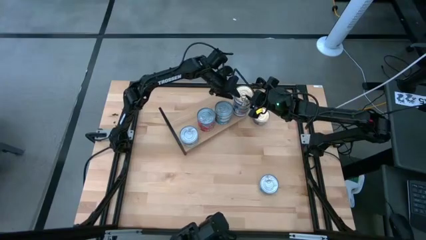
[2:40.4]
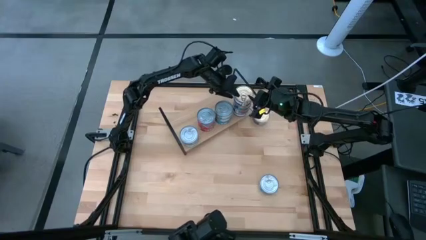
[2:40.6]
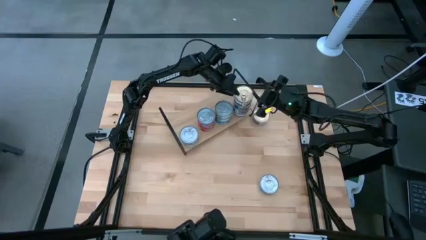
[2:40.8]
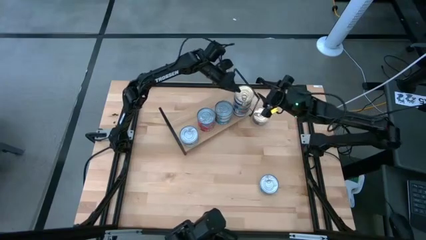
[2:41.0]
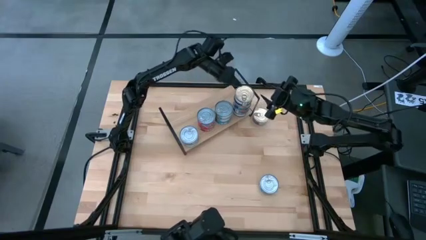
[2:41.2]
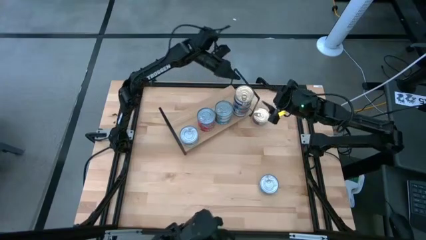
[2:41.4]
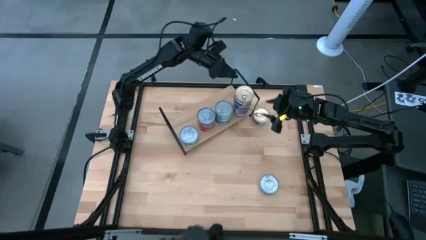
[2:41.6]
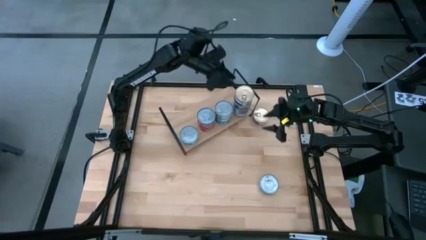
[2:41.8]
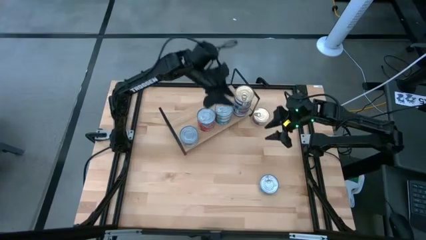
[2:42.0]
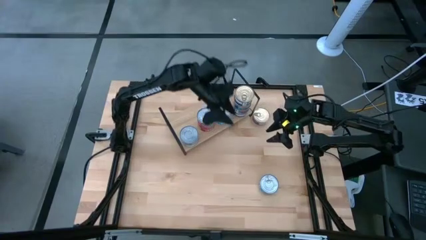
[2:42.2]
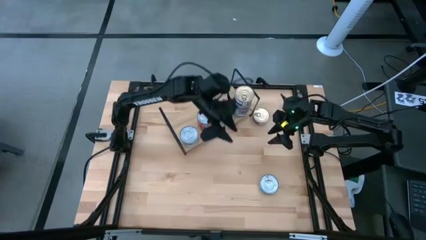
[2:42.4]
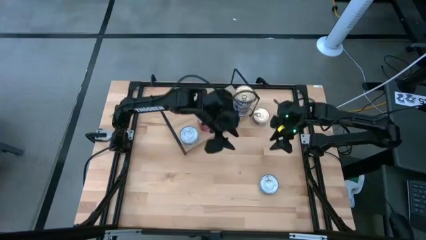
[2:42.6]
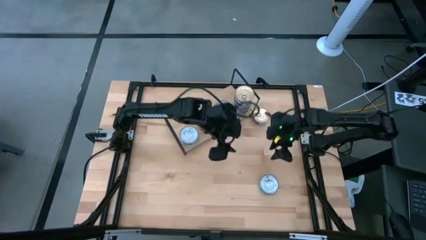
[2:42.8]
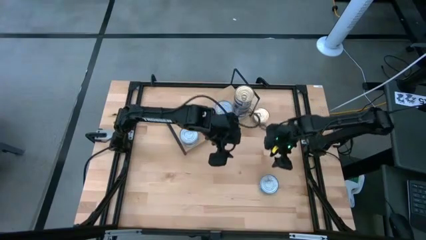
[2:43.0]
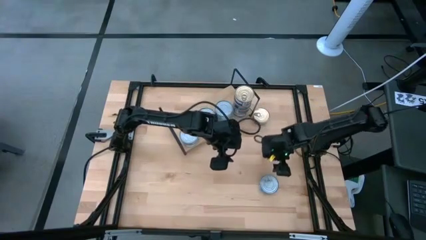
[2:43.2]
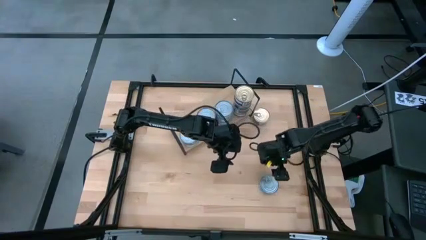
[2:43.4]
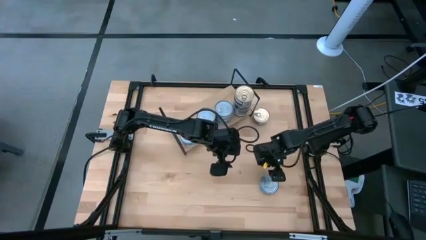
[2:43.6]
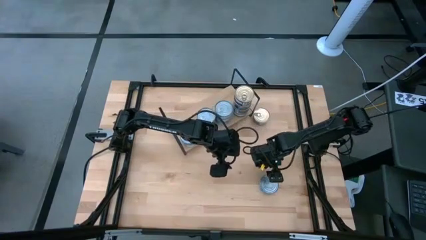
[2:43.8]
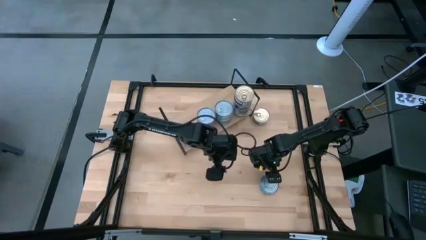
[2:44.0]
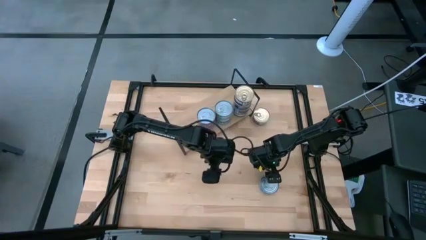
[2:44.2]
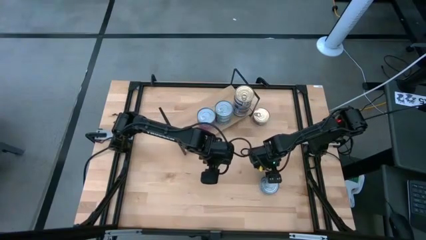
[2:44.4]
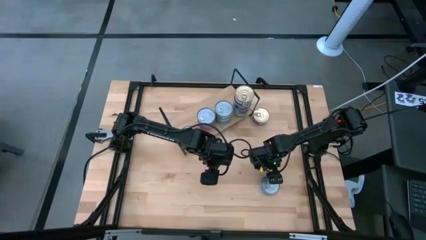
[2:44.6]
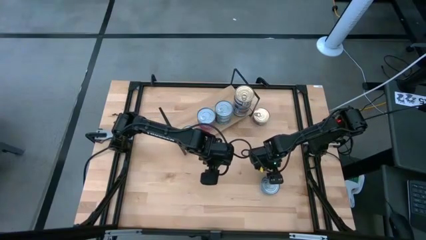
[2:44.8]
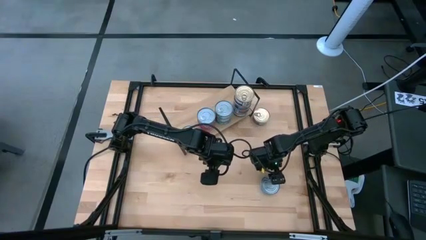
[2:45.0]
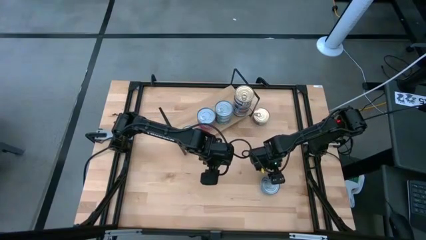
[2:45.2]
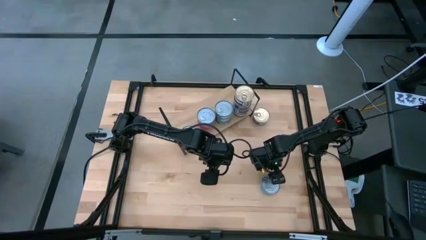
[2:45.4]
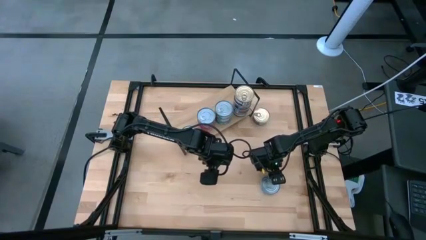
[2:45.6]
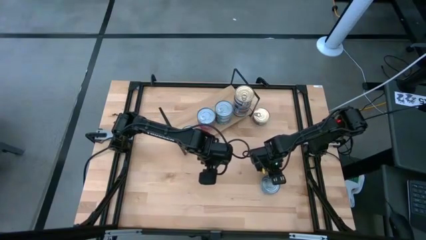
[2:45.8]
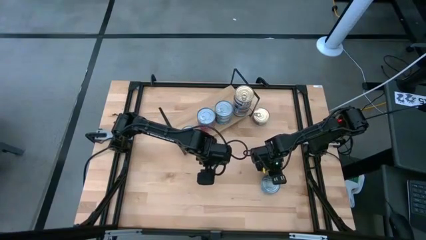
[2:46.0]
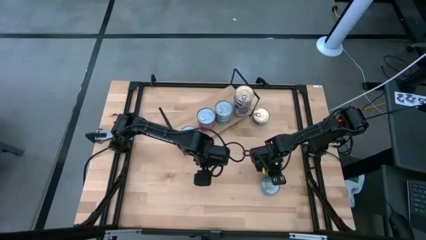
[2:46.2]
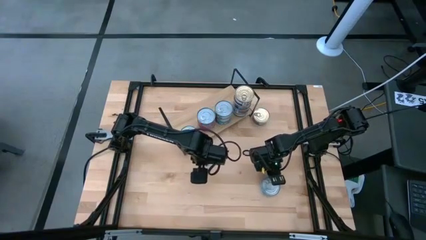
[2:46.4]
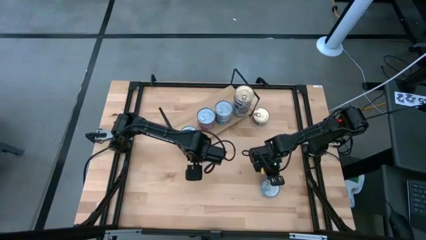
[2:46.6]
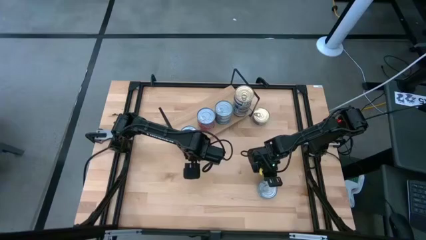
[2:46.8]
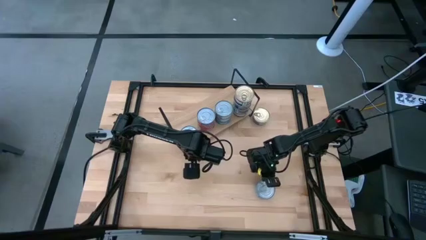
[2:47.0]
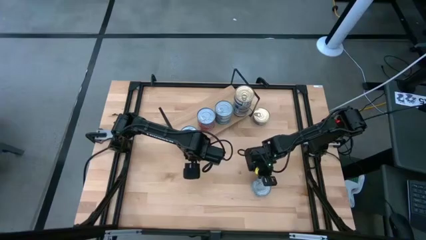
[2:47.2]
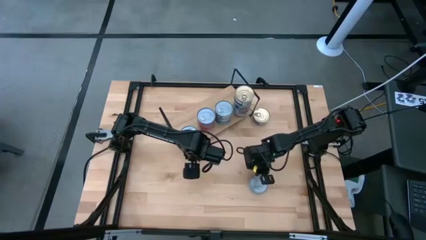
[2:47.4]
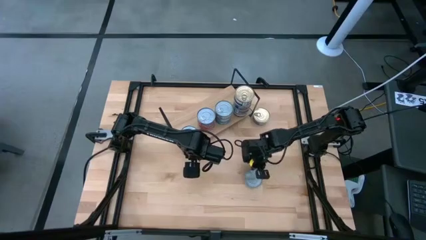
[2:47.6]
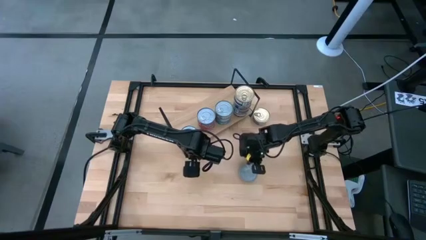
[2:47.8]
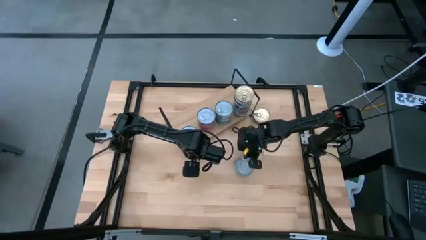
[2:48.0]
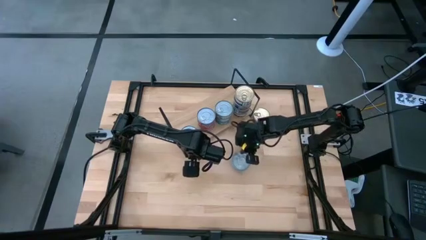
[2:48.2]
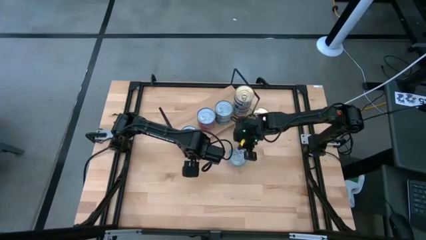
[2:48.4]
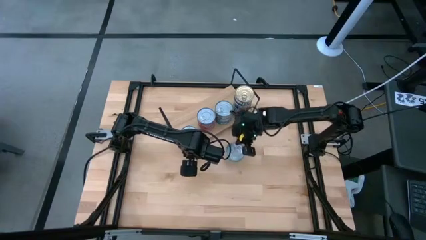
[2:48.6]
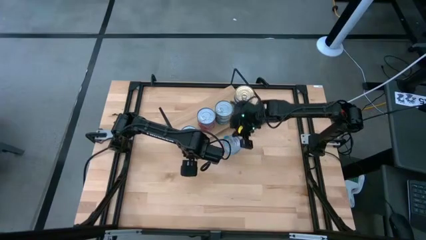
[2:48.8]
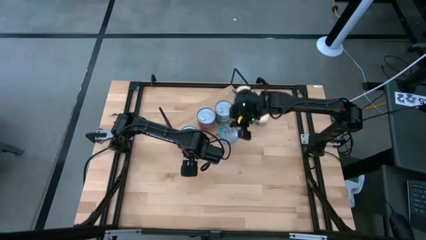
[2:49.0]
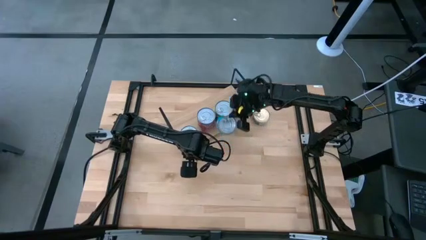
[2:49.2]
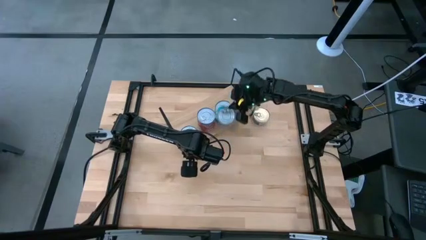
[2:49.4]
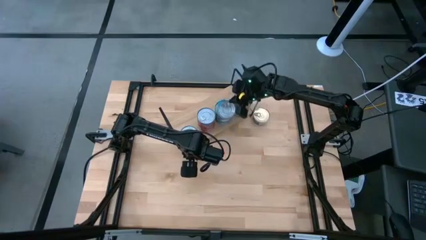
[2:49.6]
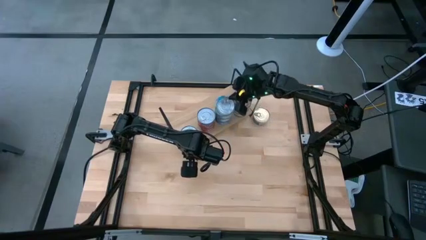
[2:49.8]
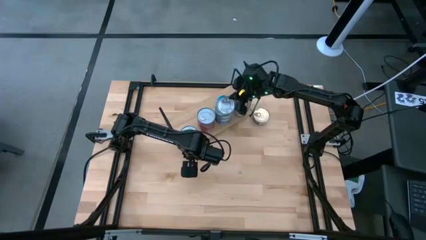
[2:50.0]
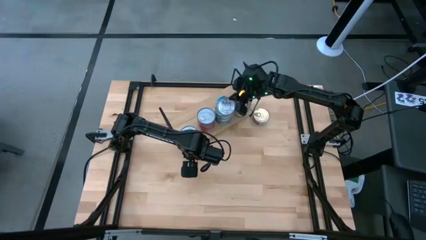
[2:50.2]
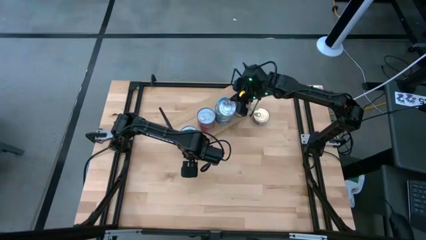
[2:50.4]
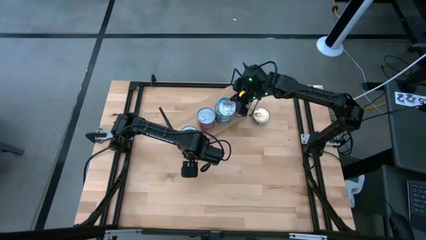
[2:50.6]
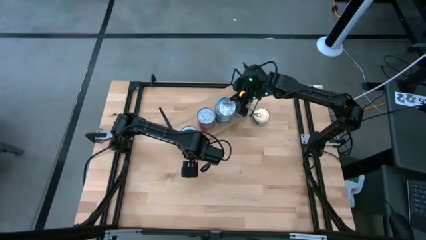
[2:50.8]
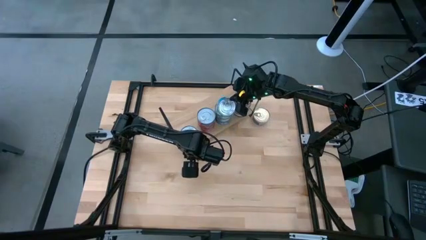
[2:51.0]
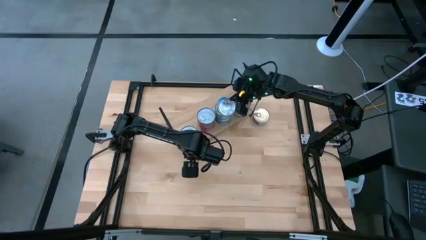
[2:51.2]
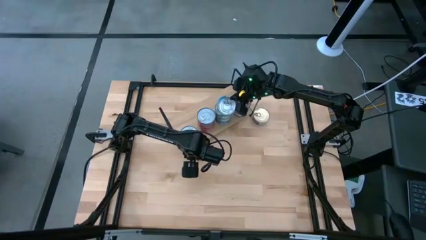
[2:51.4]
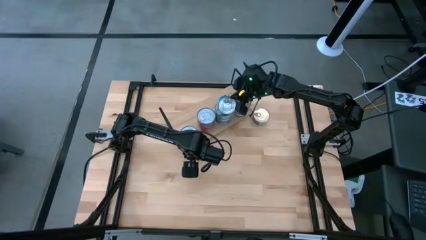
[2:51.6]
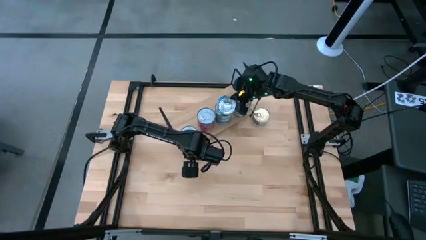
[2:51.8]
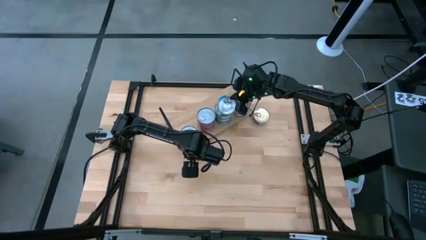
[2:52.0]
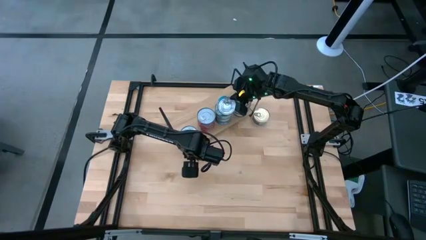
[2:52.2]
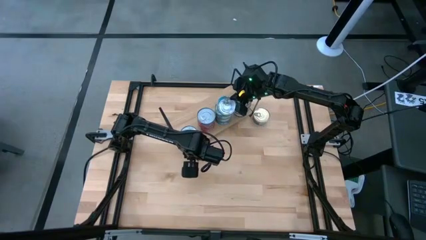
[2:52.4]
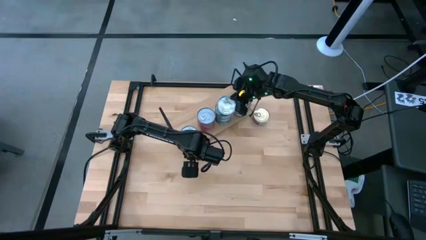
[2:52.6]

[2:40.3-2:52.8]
Task: Stack canned seafood by type on shelf
Stack the yellow blue tuna can on top of the yellow blue tuna cans on the shelf

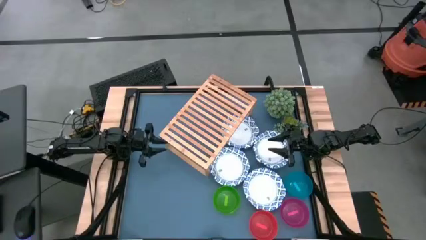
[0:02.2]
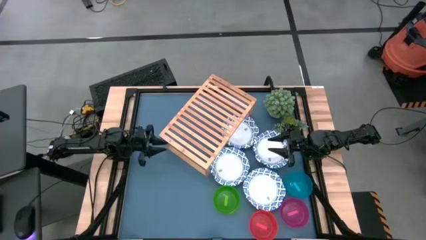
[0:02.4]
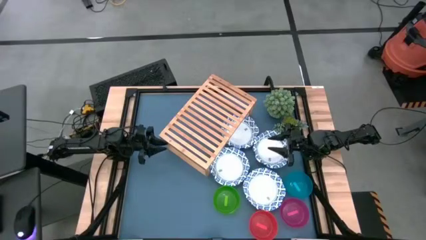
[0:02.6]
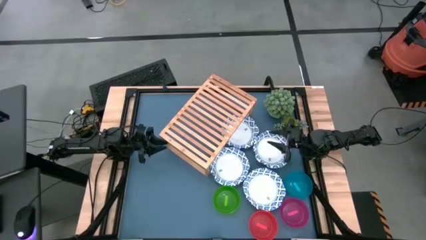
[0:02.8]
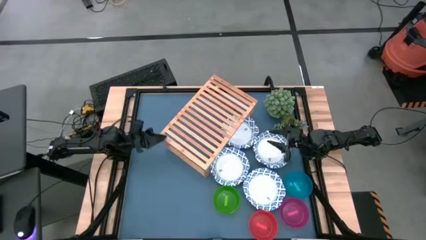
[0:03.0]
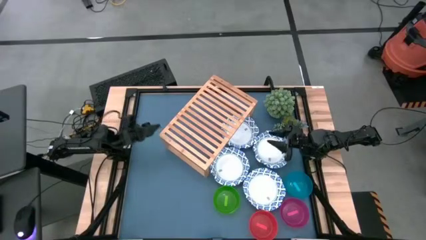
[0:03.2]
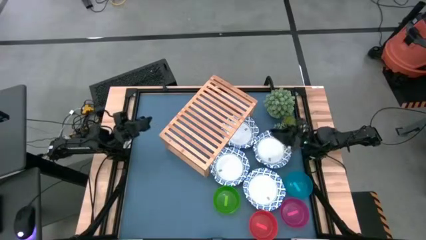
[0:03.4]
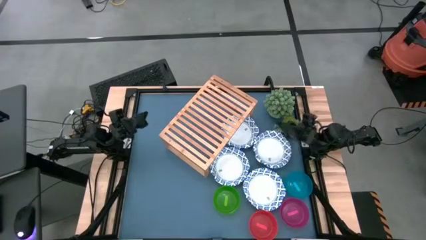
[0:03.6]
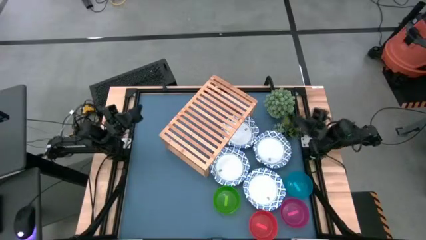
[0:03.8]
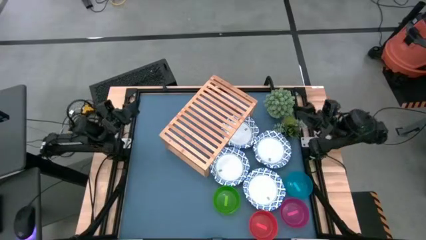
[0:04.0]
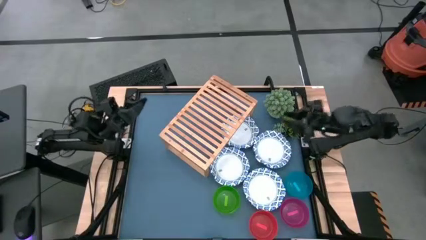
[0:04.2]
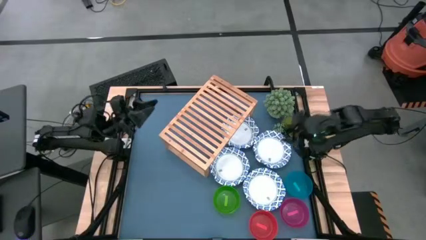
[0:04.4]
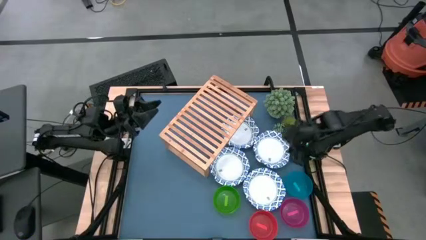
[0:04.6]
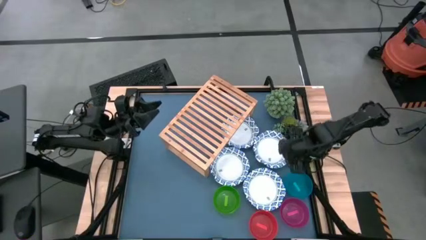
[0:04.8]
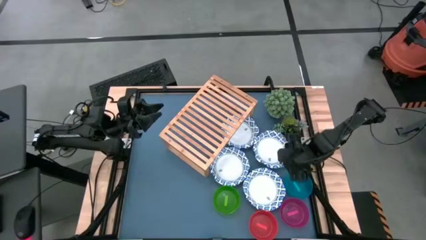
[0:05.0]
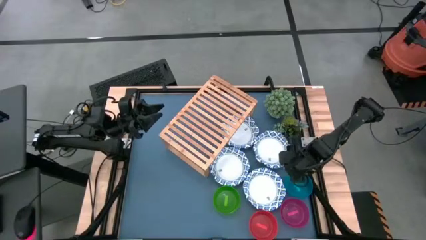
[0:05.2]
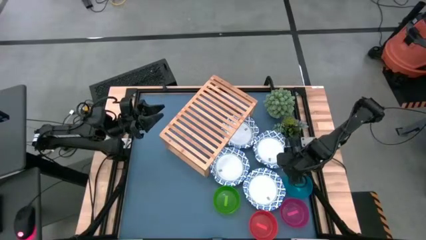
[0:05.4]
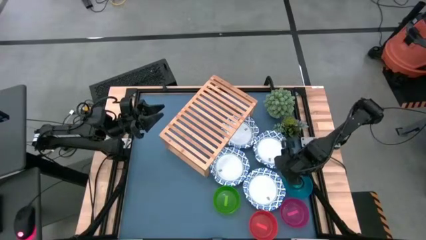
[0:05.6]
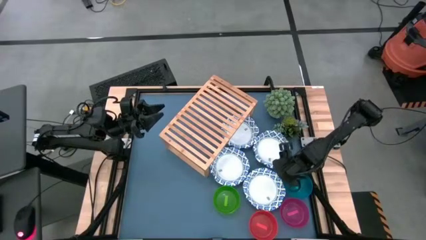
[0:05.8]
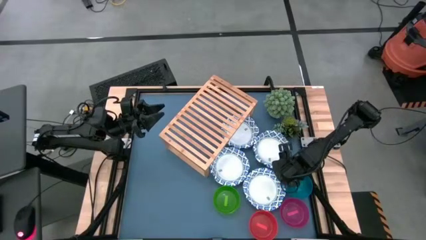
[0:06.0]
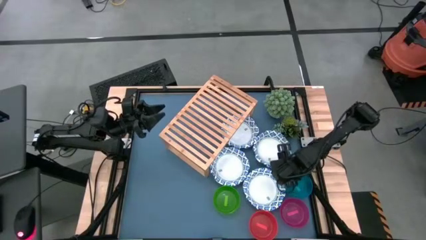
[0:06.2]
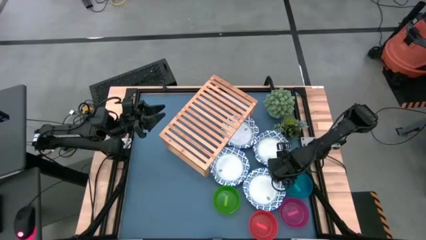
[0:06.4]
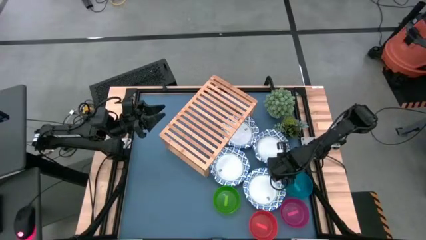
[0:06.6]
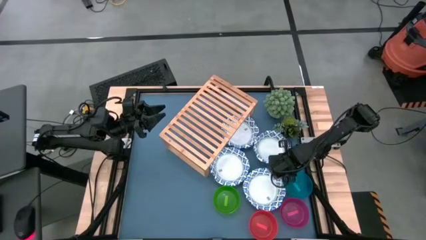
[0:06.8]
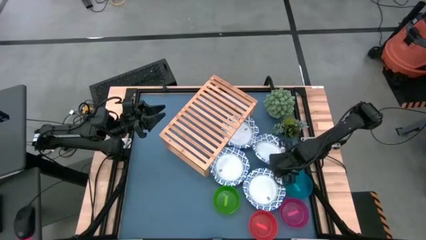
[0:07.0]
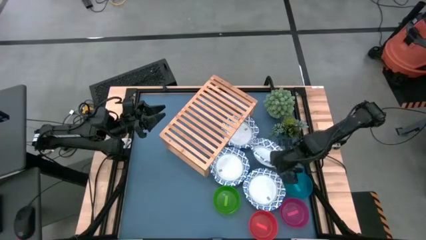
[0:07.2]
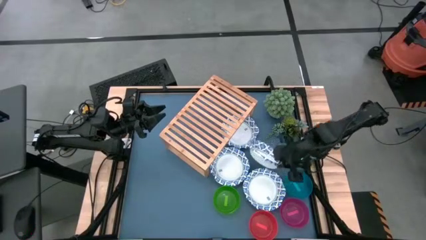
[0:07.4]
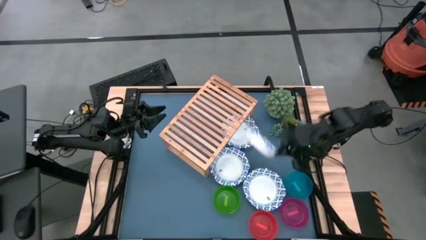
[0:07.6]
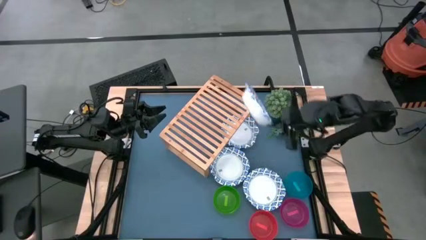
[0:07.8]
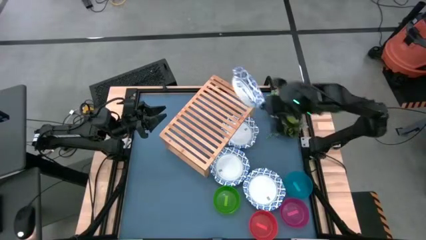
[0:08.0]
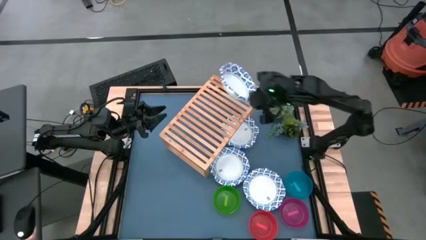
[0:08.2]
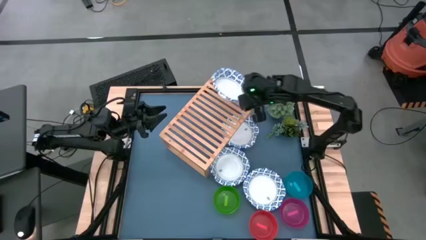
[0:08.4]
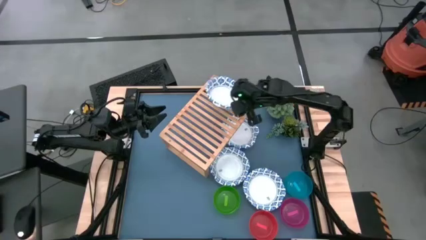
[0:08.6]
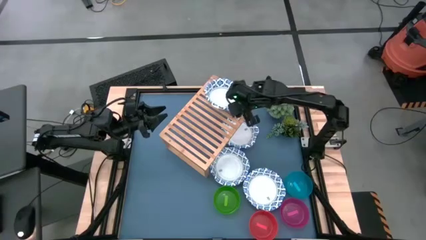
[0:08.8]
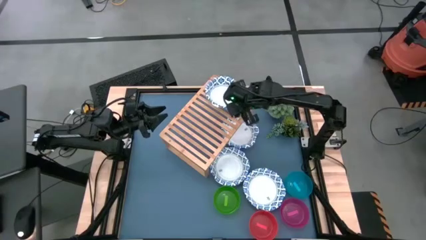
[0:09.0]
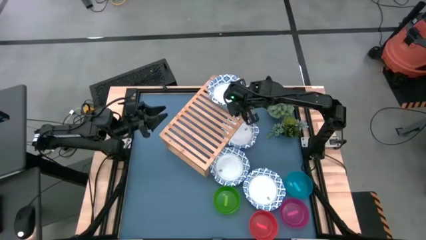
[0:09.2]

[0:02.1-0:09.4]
Task: Place and stack bowls onto a shelf
Put the white patterned bowl on the shelf
